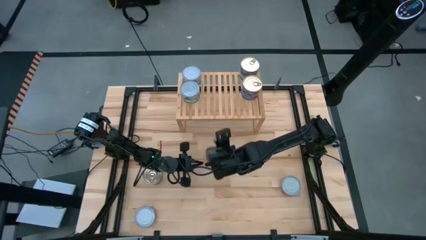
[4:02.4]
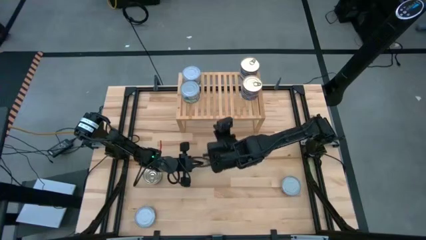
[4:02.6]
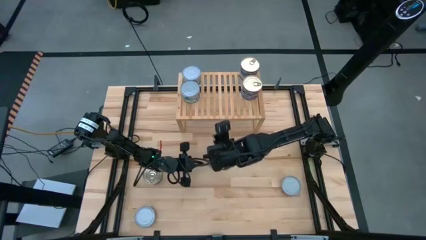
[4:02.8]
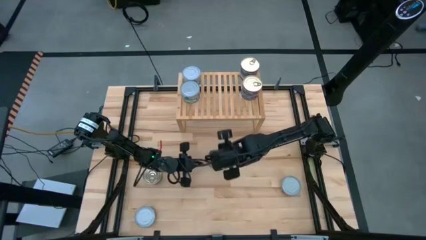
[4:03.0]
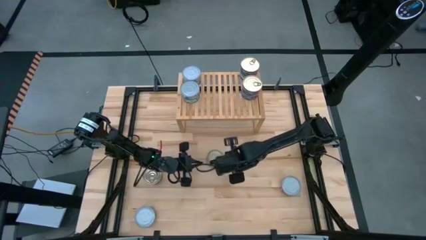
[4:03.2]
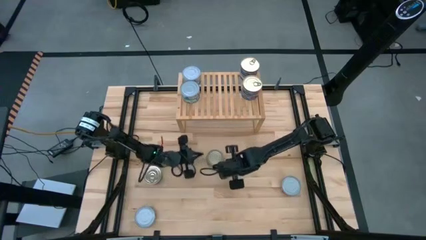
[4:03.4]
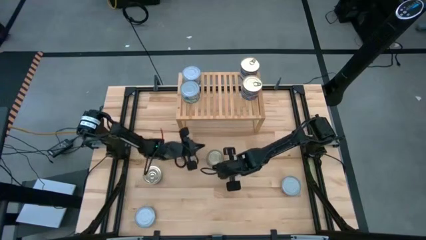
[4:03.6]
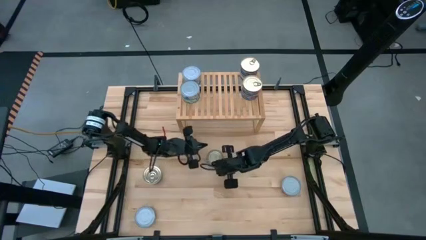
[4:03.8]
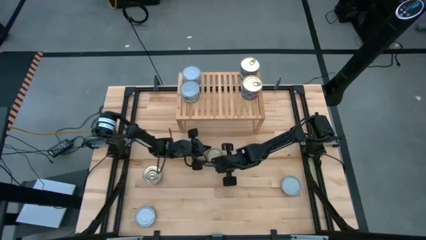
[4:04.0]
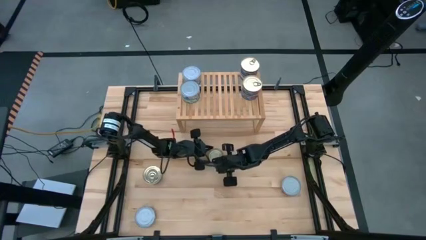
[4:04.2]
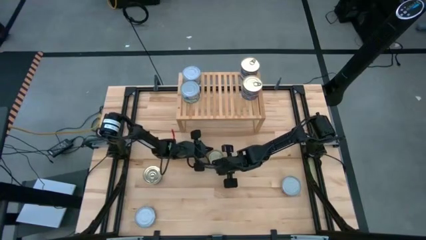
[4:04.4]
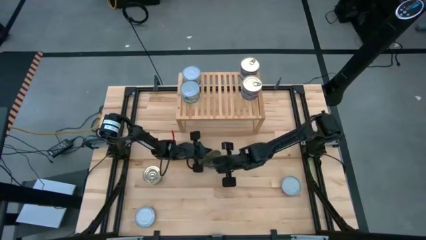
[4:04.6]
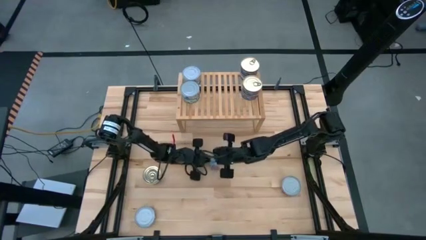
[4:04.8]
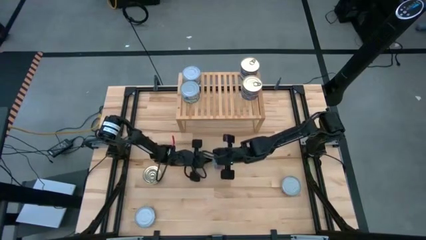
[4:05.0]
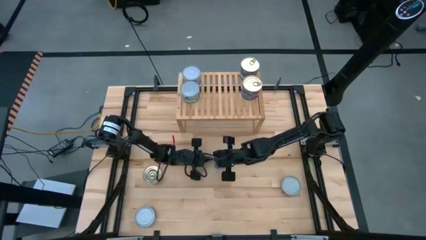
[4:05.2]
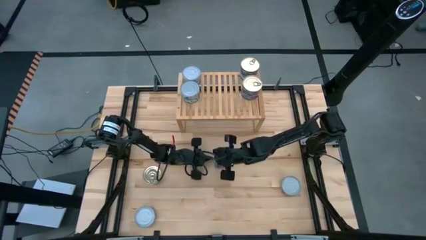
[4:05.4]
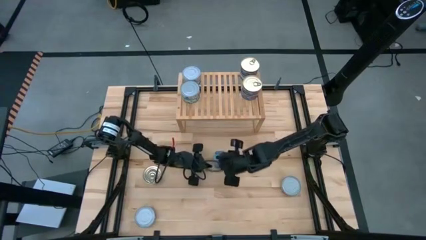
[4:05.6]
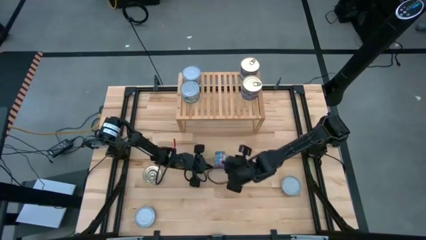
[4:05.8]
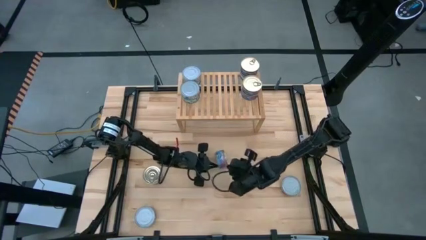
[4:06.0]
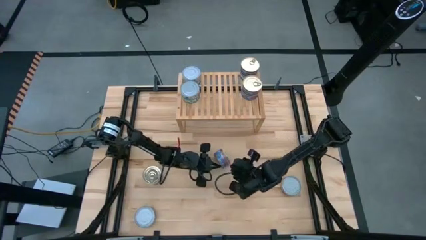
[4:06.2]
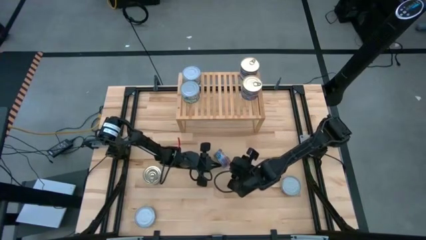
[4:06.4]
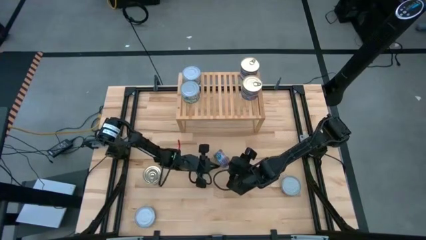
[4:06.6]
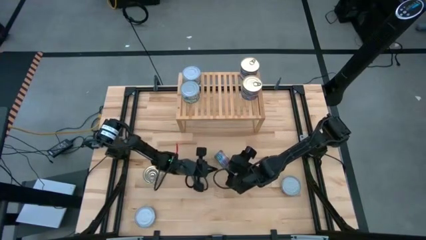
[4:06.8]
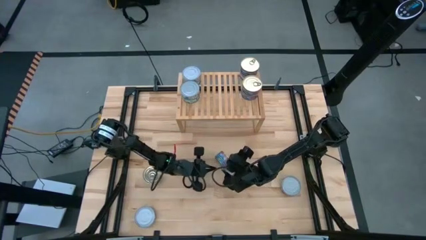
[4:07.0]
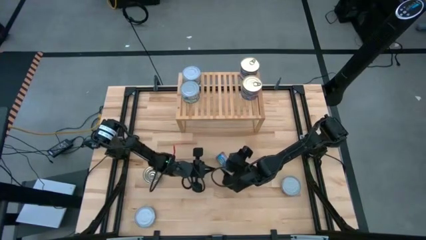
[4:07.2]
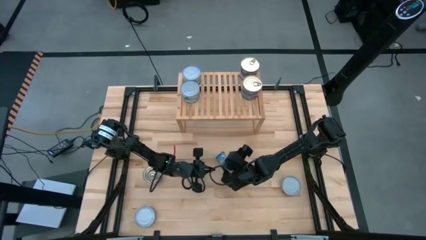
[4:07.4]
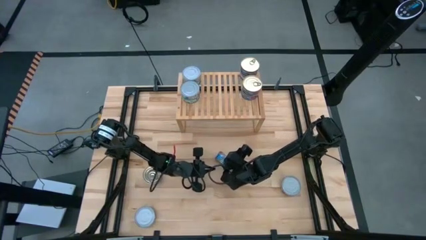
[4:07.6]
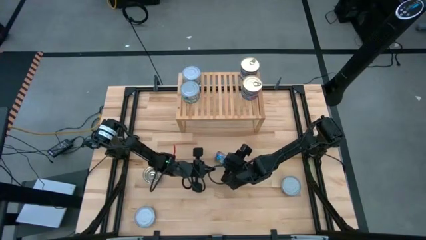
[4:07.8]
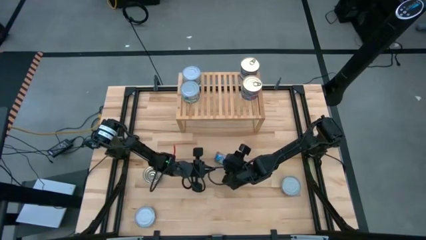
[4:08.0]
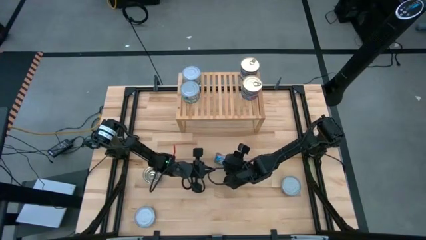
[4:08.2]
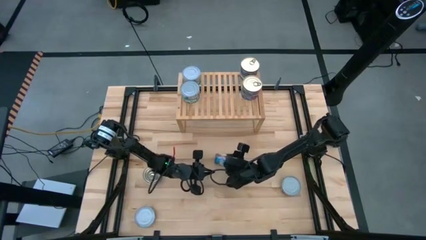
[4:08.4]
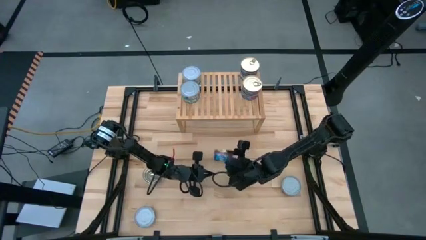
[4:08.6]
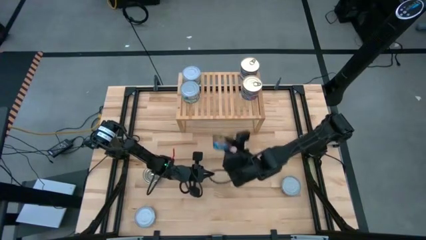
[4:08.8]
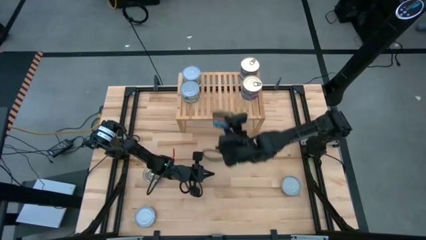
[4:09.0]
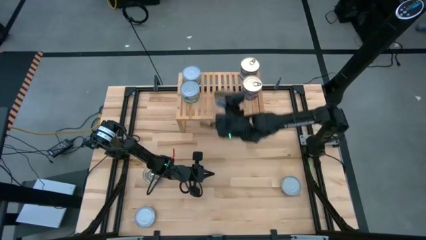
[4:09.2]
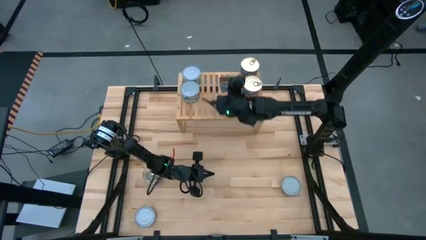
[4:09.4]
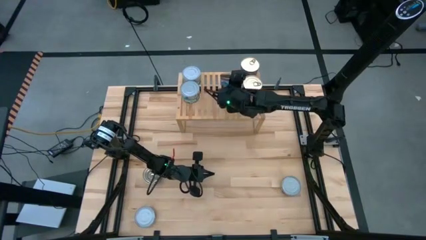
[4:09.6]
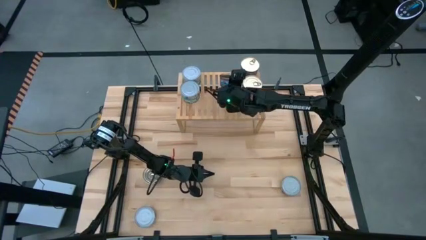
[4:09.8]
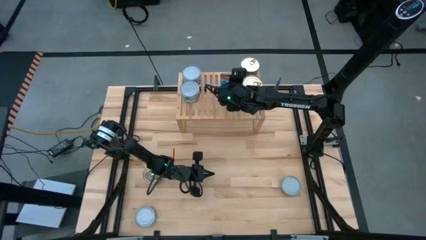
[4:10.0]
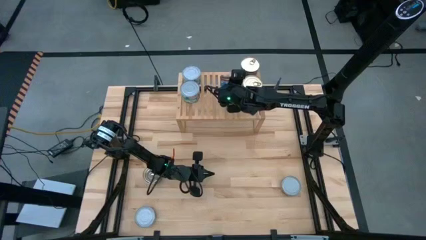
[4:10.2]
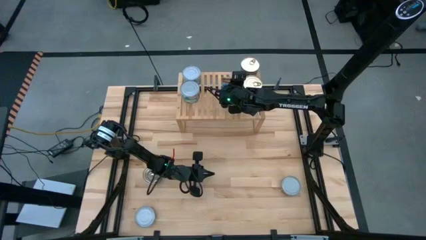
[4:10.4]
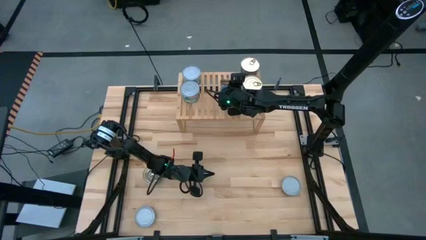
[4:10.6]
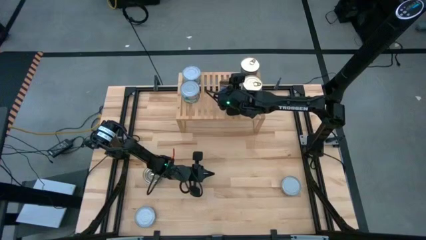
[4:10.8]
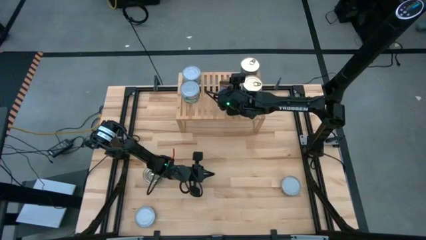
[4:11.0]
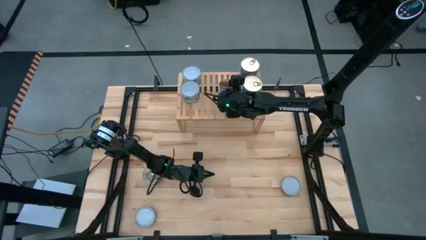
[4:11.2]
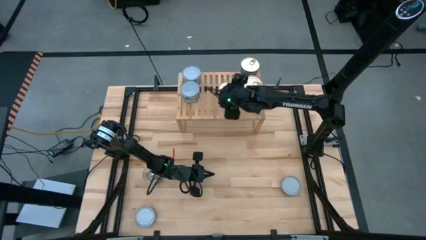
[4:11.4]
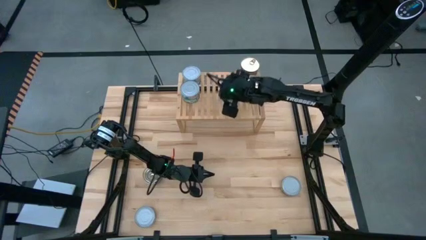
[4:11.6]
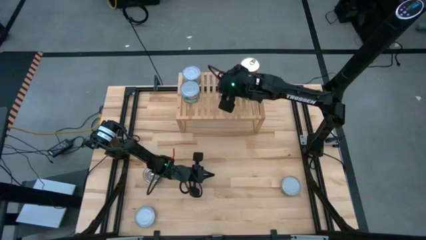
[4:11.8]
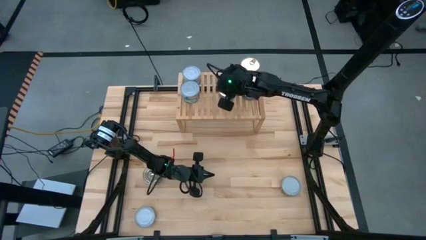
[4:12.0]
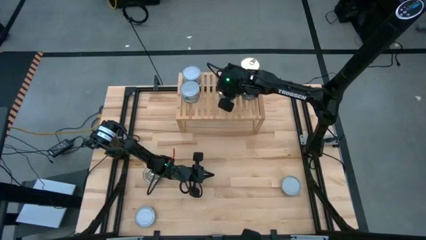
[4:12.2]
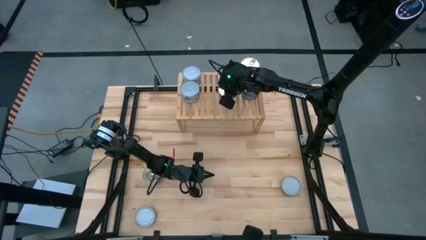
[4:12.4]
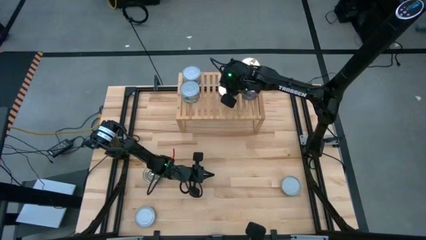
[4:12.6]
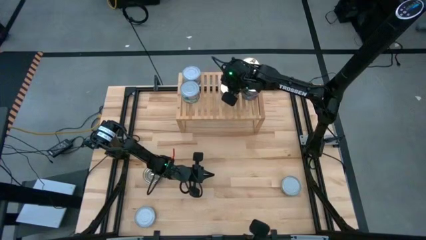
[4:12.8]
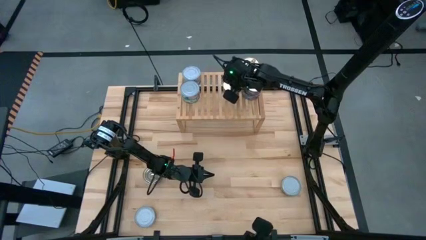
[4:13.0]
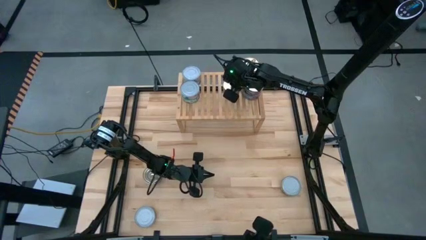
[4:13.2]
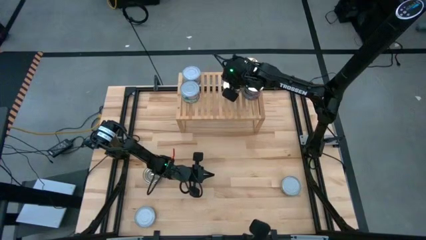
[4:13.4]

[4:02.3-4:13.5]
Task: Stack canned seafood by type on shelf
Put the blue tuna can on the shelf

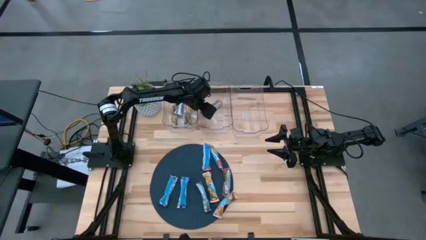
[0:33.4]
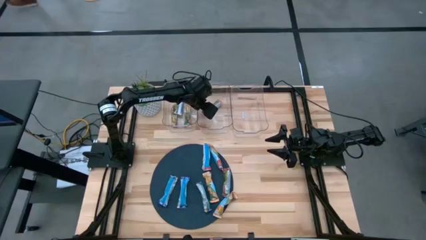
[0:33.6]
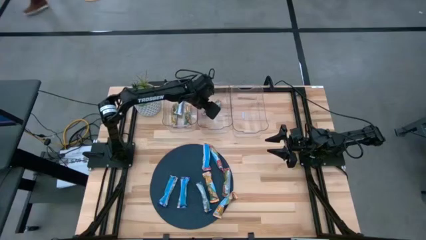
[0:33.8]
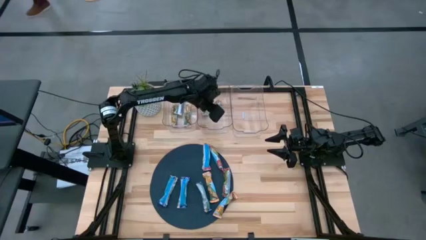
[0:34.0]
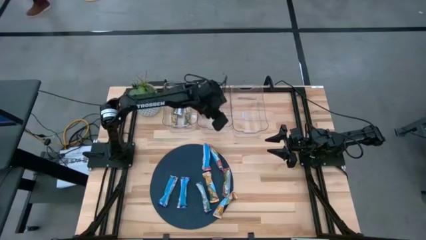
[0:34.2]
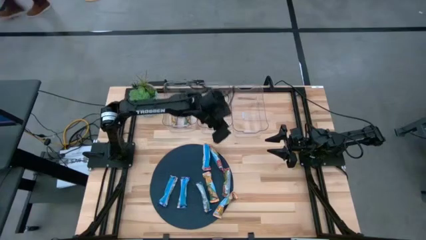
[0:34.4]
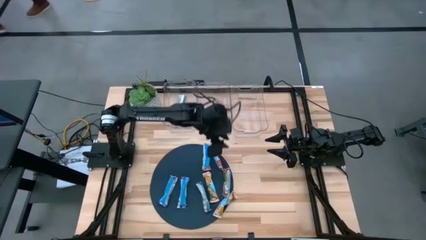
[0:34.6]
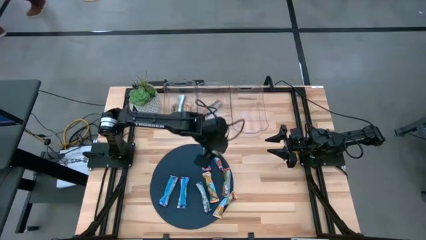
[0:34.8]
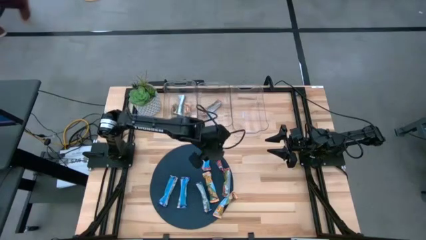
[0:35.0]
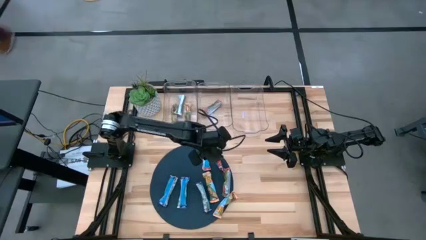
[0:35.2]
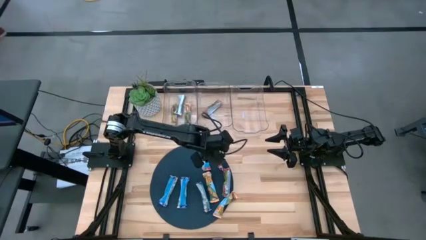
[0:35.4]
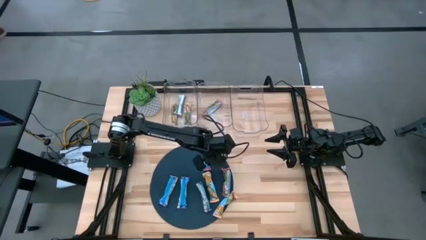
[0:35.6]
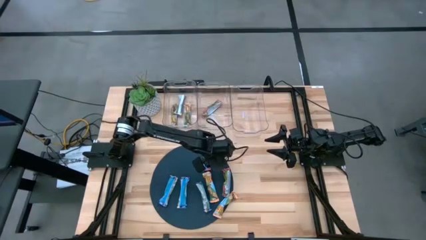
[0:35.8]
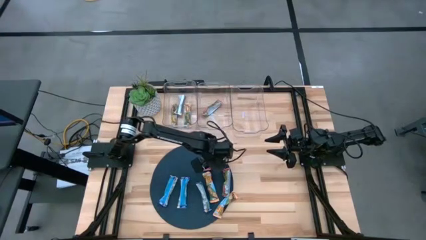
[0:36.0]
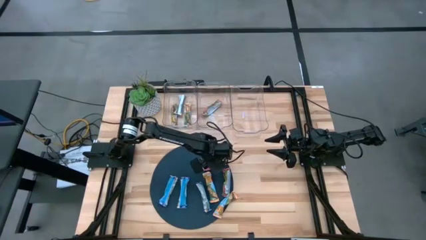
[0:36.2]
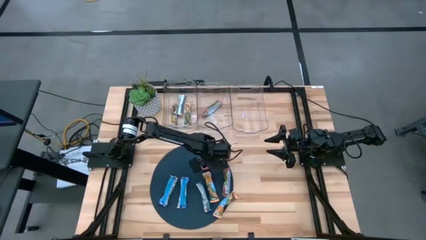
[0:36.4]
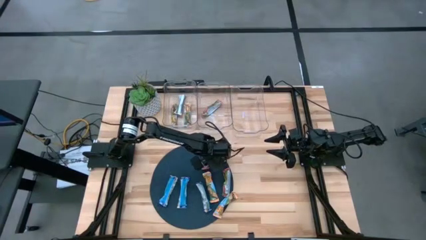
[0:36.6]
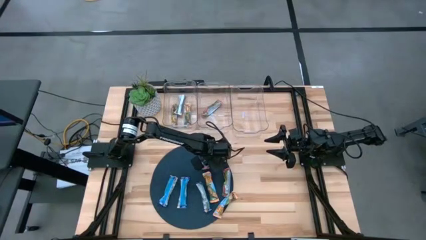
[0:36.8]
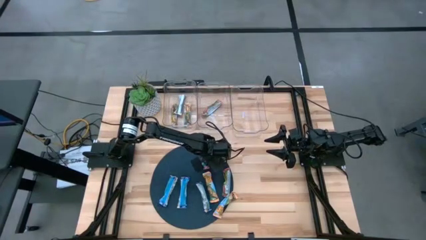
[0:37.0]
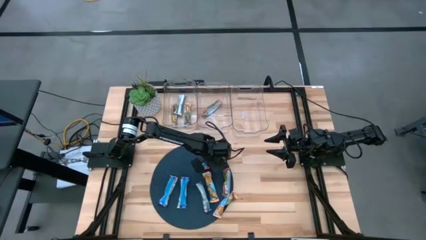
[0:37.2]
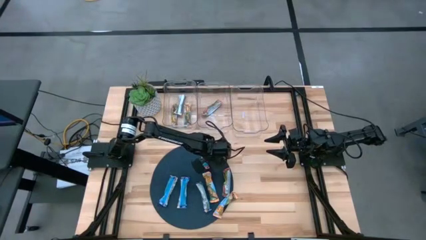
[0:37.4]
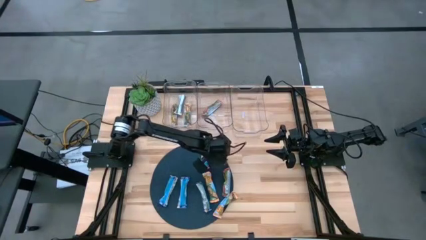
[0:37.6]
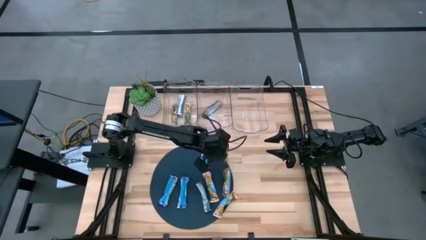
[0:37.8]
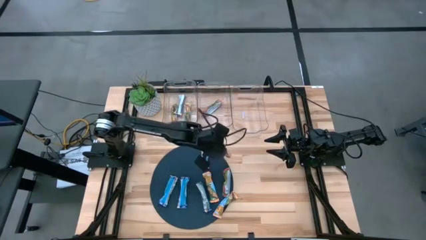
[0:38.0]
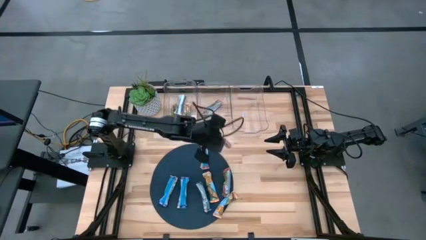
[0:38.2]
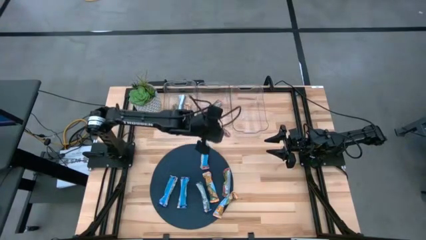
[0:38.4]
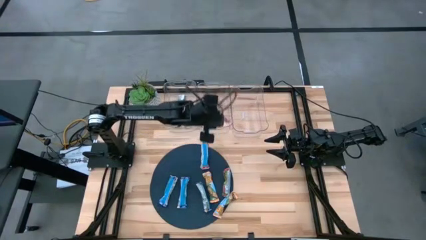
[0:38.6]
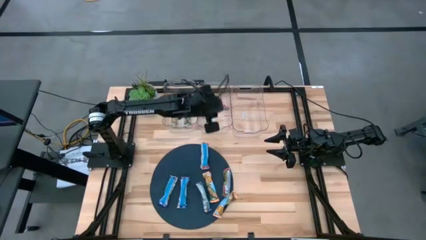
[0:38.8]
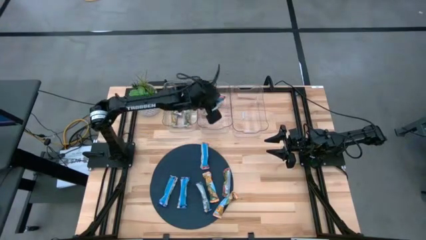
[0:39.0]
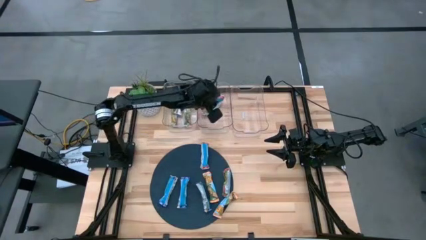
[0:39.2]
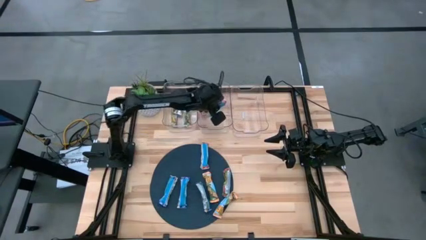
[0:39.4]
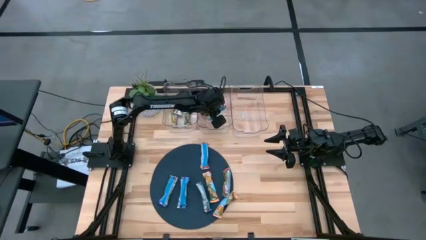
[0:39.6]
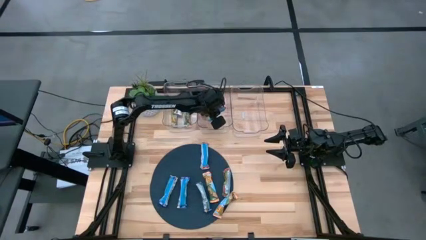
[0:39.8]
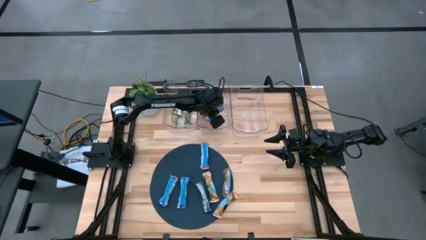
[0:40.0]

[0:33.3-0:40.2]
Task: Pick and place Granola Bars by type
Put the red granola bar into the center transparent bin
